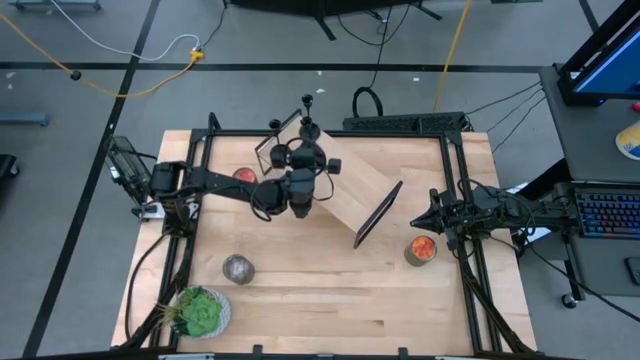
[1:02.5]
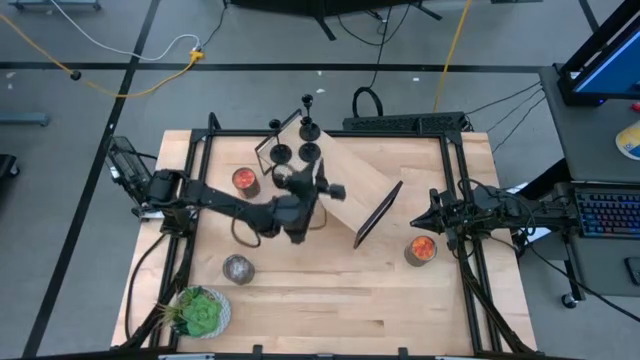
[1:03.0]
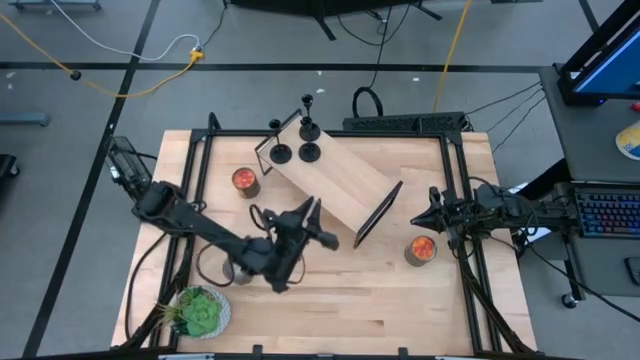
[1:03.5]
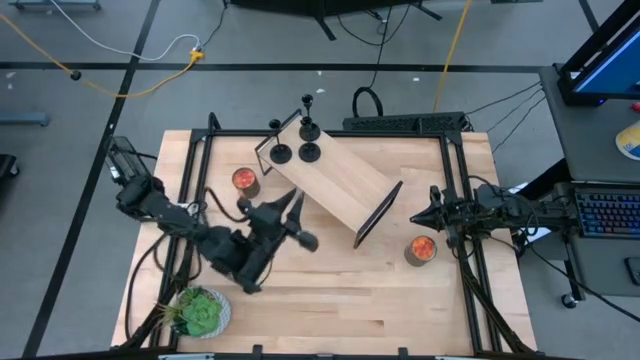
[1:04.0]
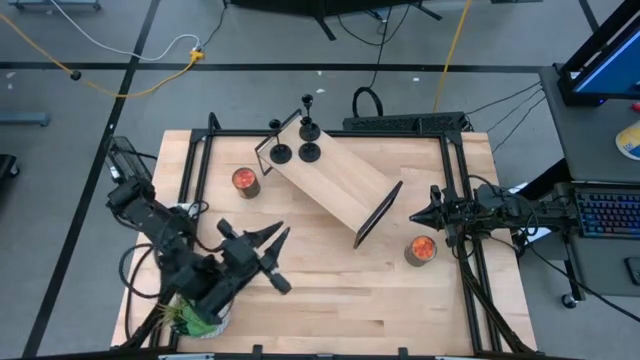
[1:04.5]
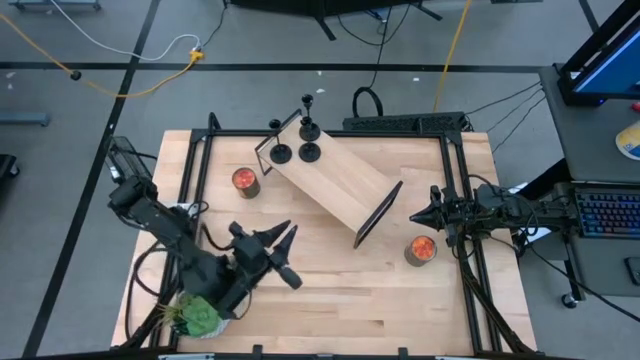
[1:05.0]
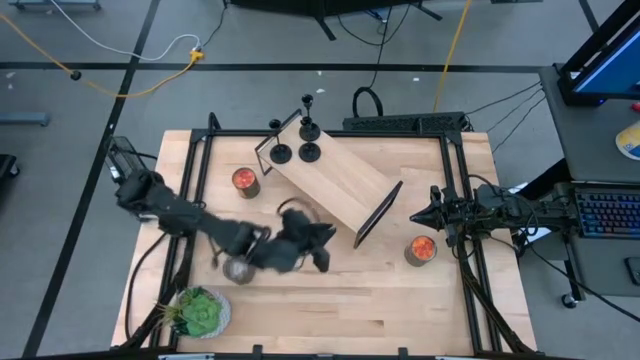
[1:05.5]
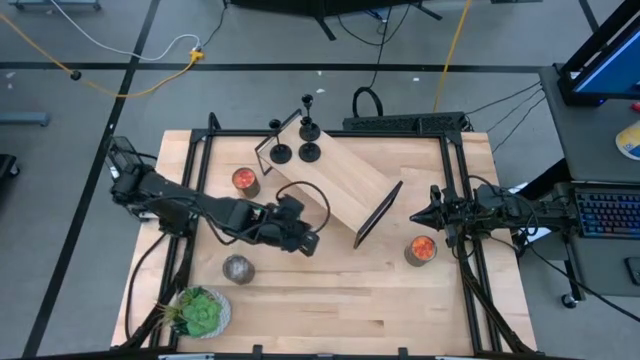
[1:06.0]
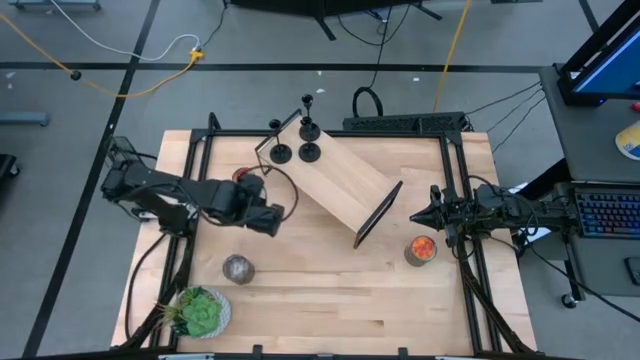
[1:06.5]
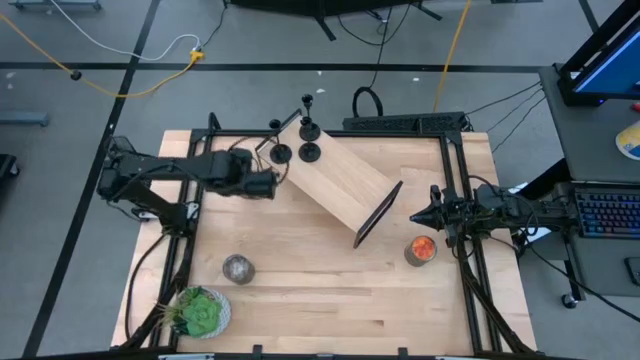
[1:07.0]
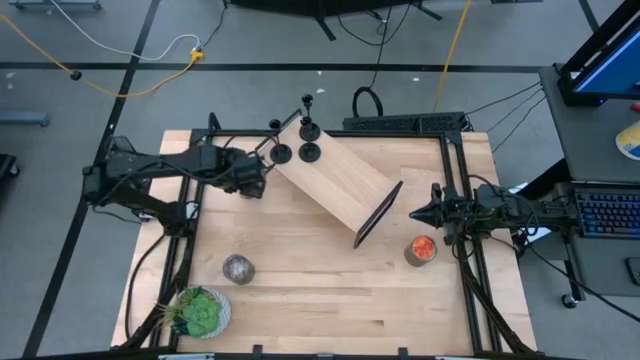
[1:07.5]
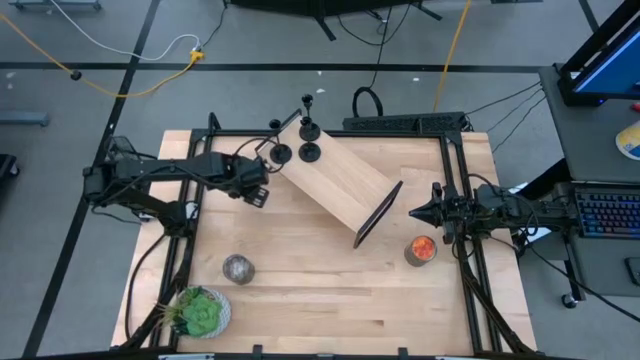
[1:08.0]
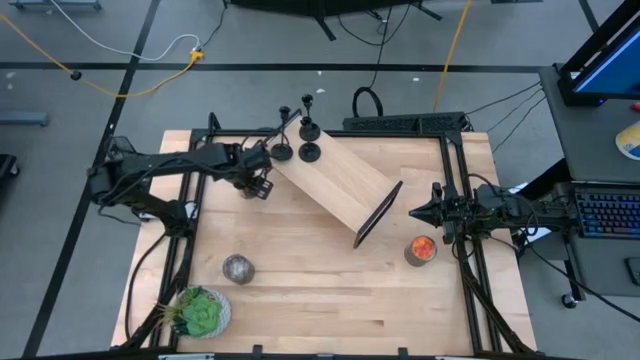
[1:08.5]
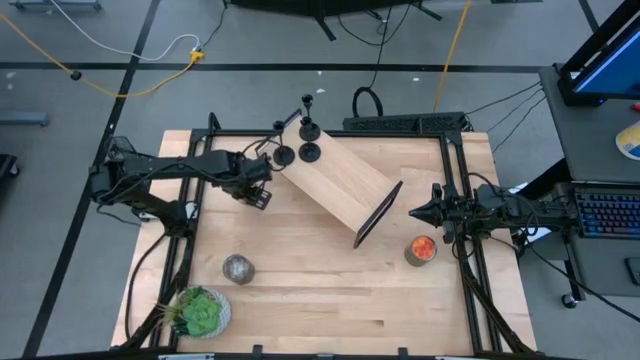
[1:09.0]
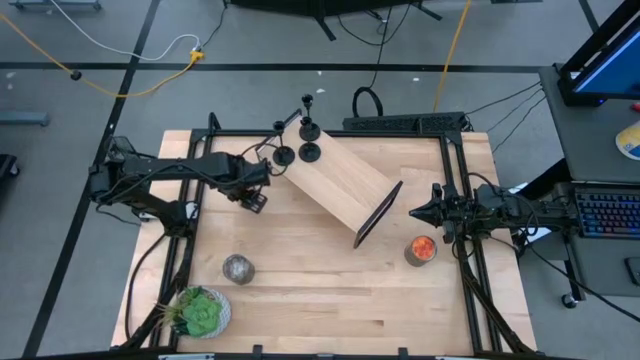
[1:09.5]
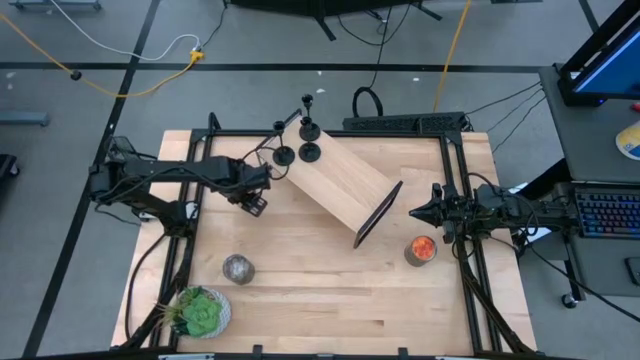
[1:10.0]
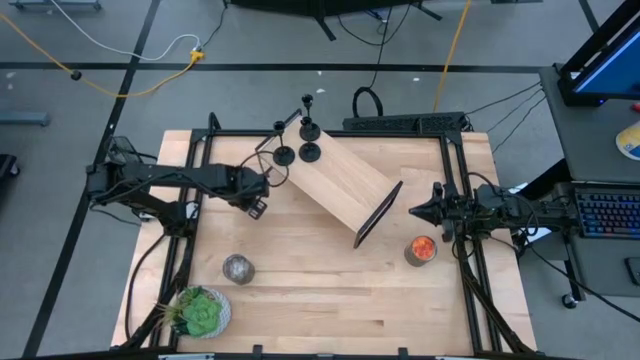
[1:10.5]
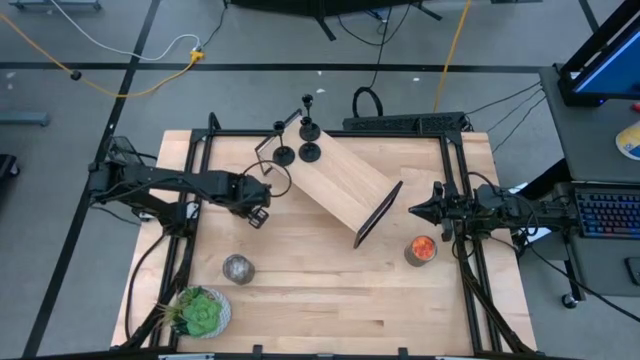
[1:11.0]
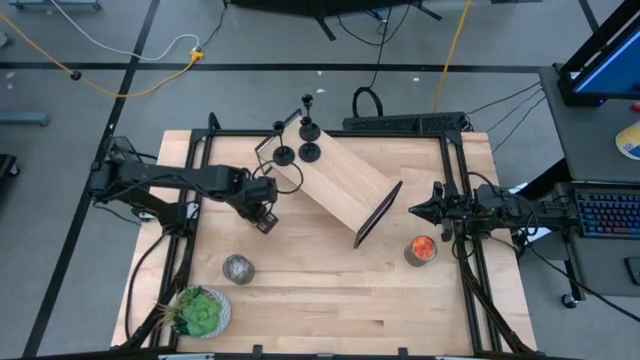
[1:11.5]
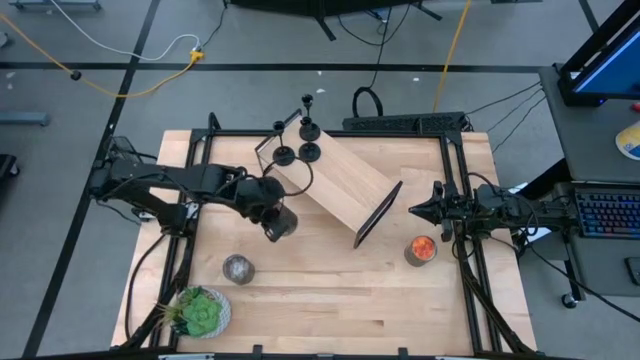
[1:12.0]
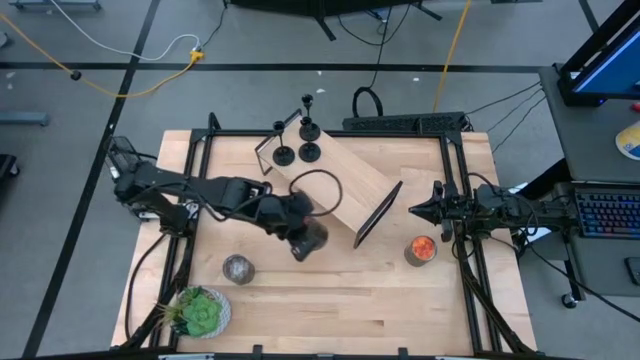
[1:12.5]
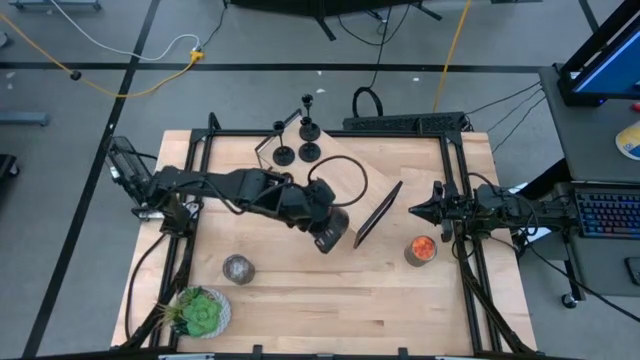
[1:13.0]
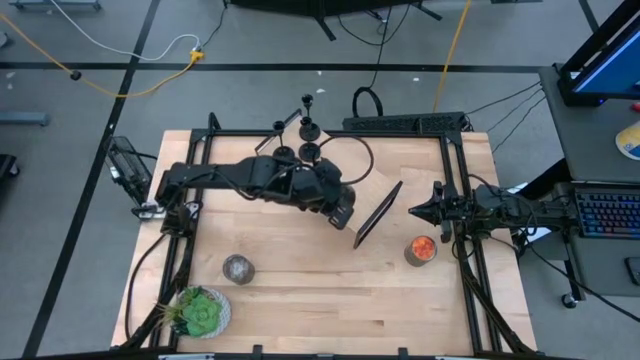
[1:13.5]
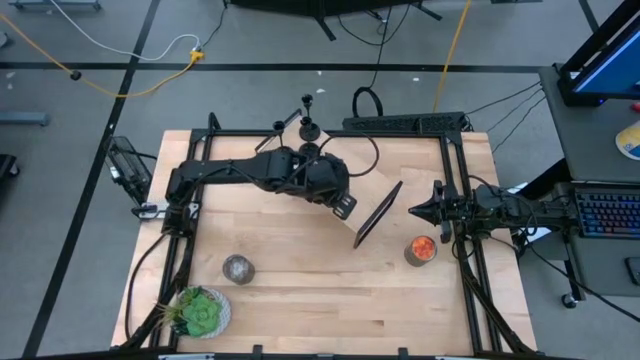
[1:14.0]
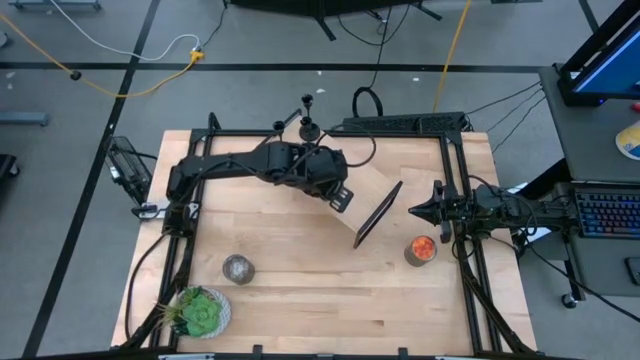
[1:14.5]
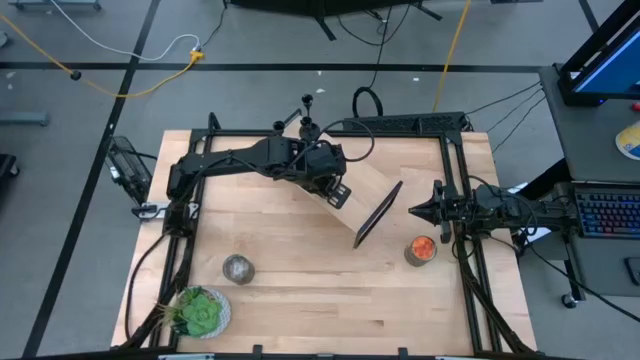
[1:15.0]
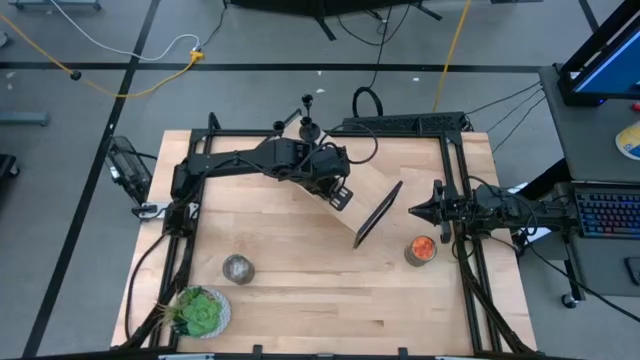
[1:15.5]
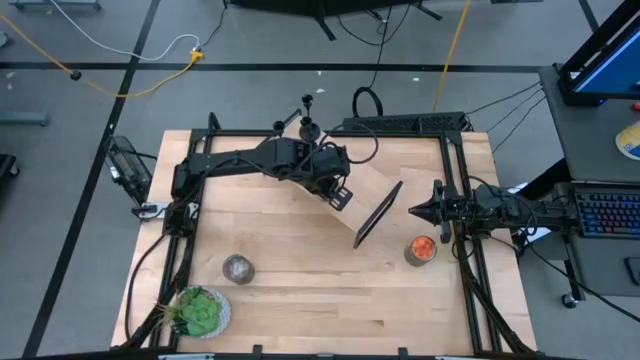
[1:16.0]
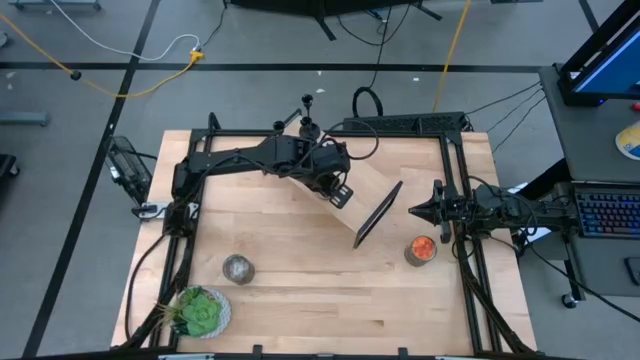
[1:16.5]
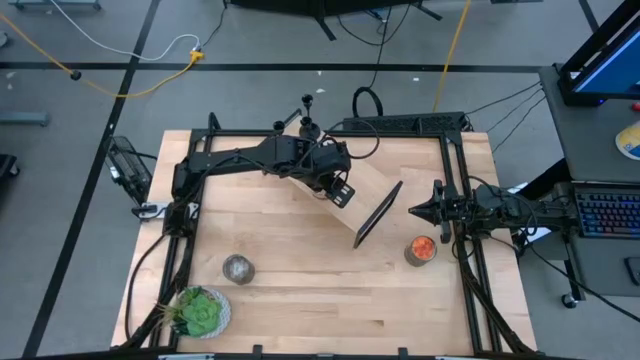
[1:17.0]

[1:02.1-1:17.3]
Task: Pick & Place candle stick holders
Put the top orange scented candle on the shelf

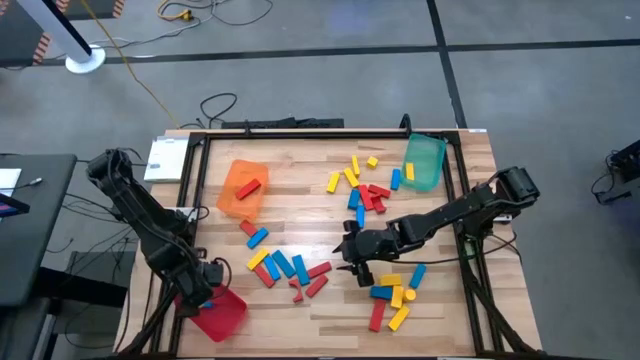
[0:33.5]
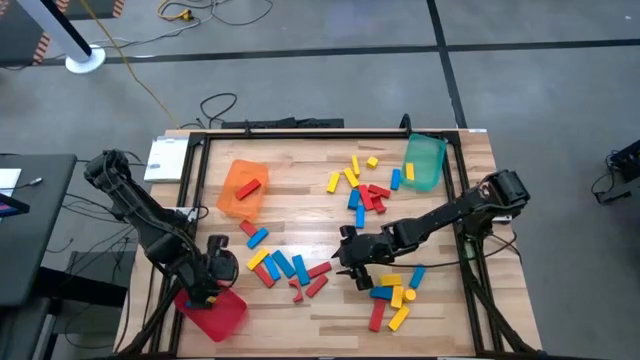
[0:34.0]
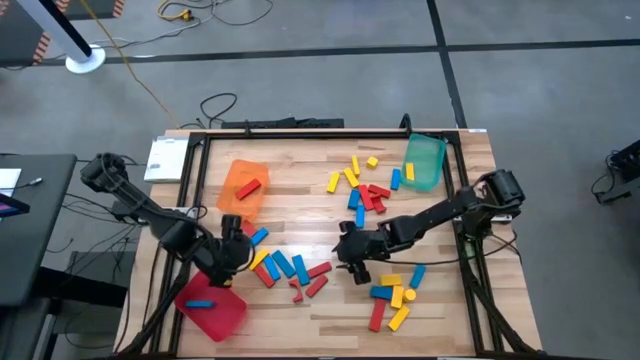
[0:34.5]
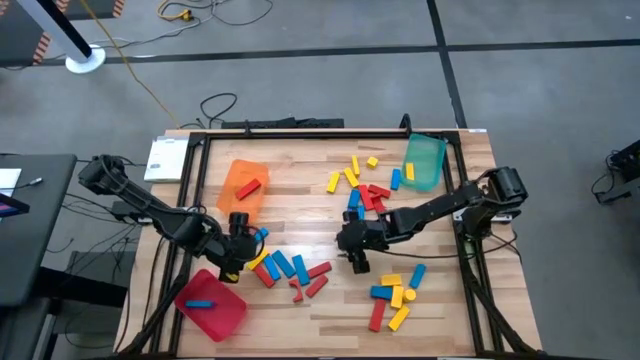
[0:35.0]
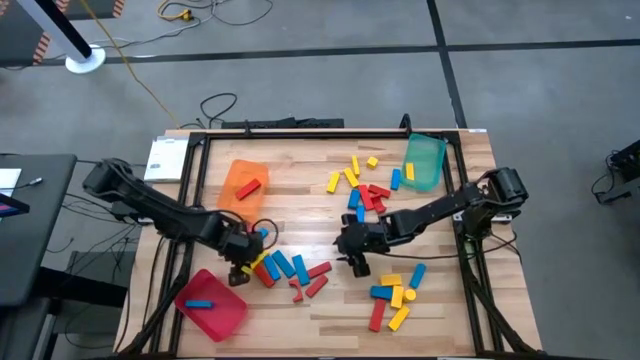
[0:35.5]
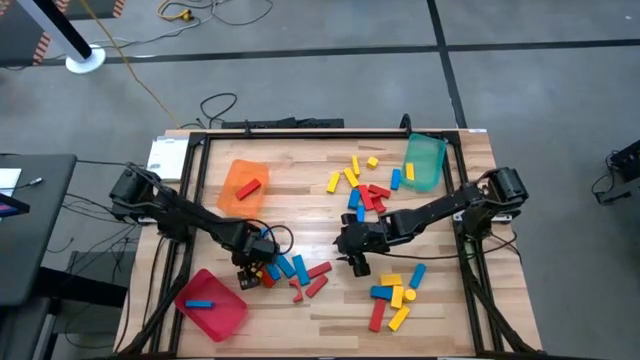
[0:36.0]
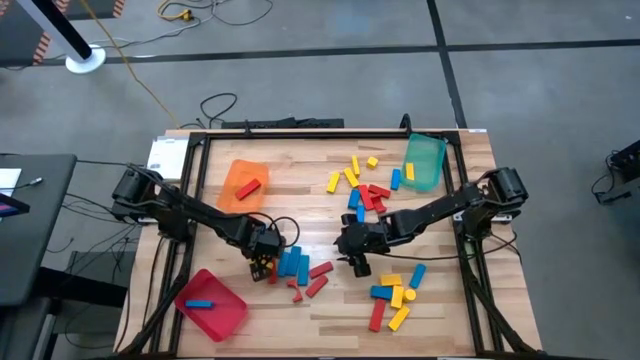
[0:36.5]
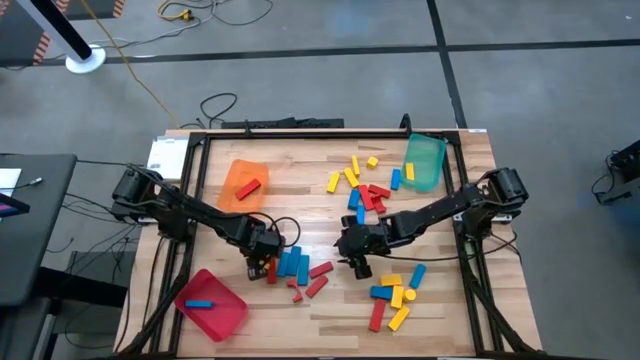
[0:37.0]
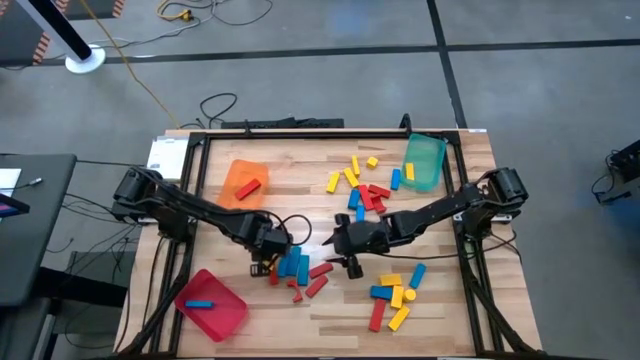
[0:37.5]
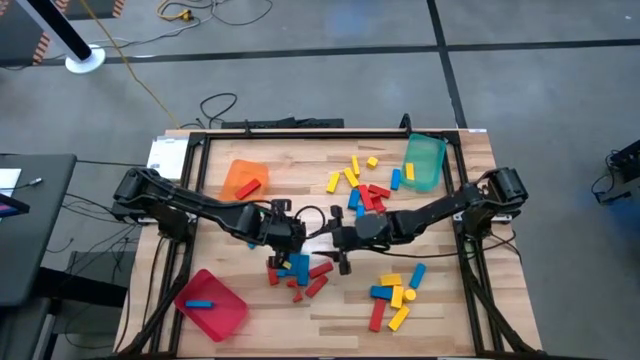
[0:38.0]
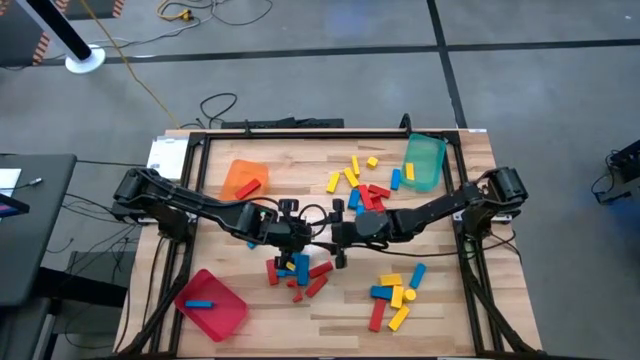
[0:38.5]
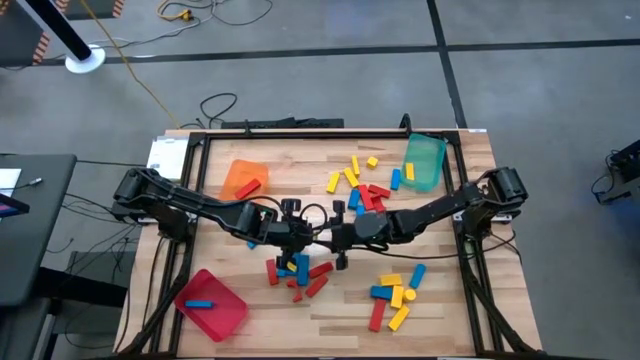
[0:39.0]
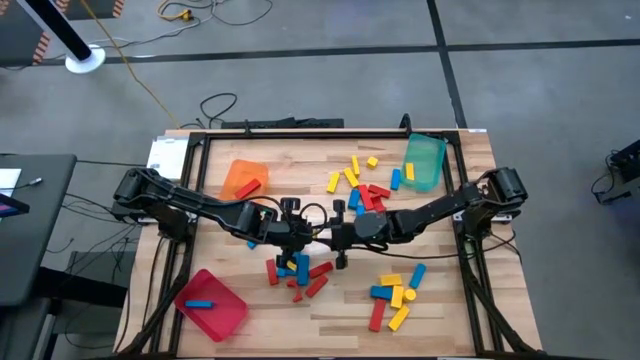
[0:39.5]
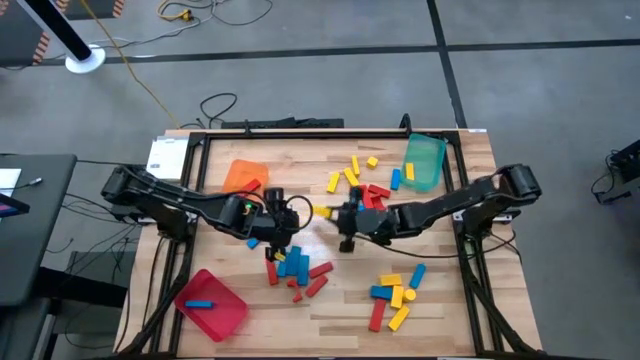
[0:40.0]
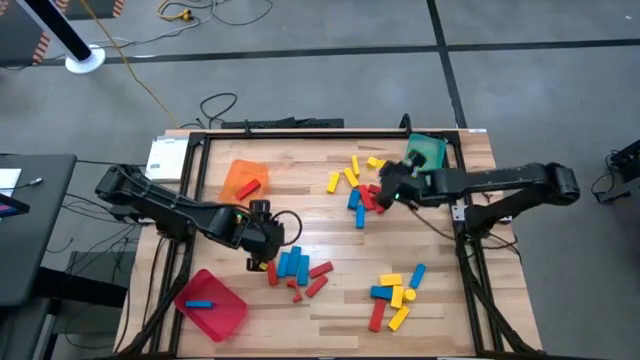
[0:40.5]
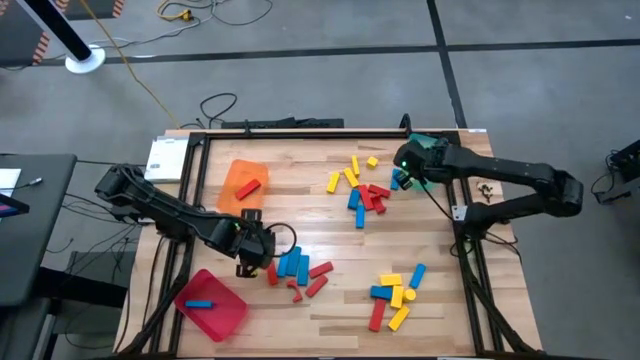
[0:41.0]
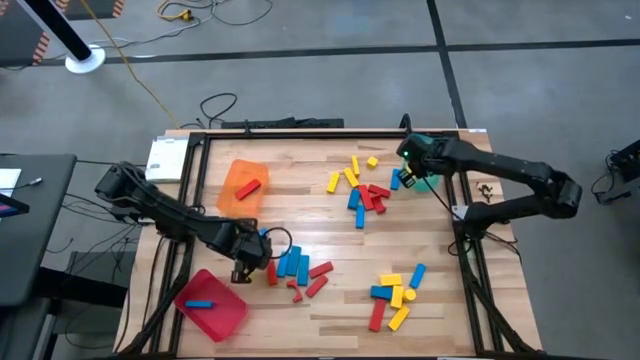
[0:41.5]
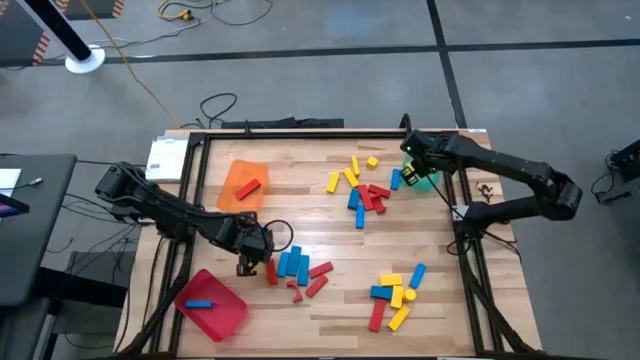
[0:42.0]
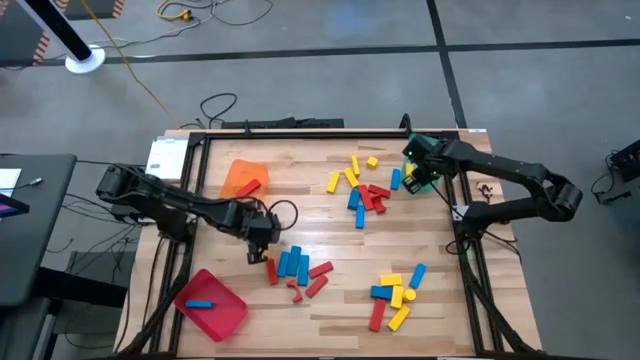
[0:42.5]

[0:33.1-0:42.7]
Task: Sort blocks
Put the yellow wooden block into the green bin
